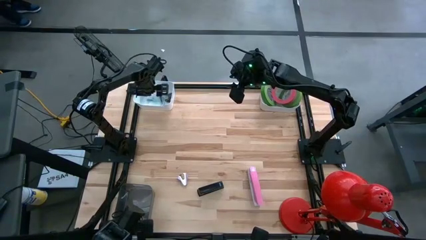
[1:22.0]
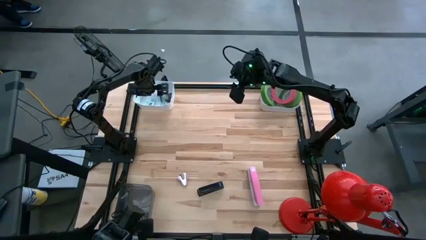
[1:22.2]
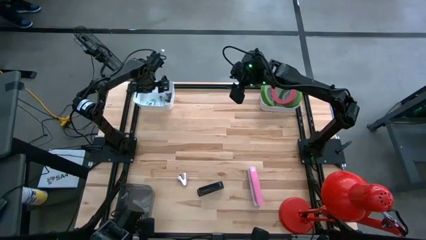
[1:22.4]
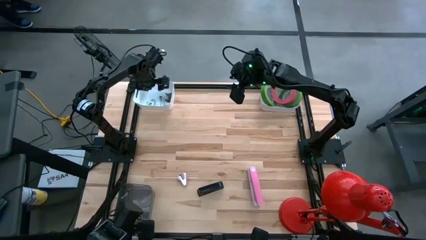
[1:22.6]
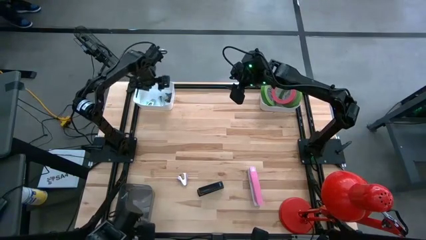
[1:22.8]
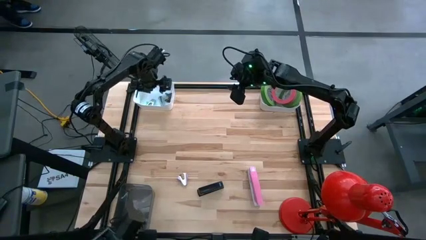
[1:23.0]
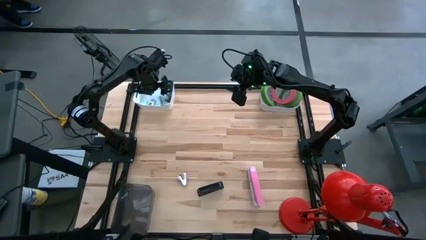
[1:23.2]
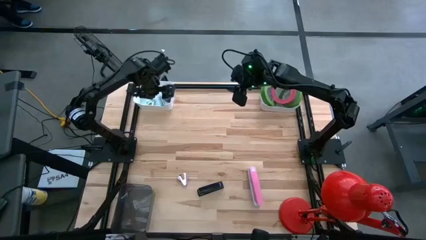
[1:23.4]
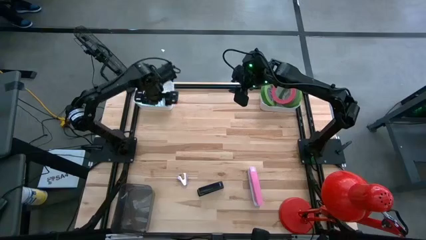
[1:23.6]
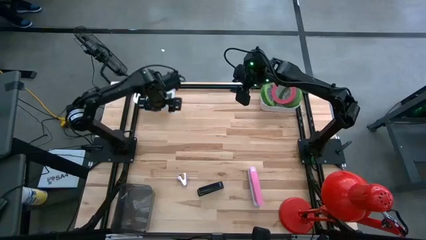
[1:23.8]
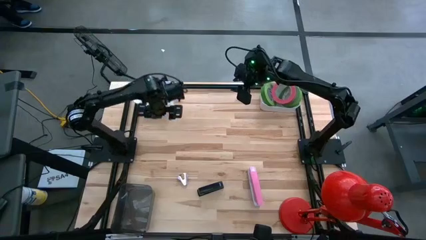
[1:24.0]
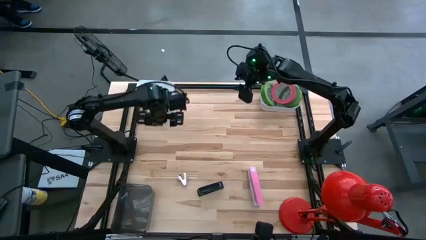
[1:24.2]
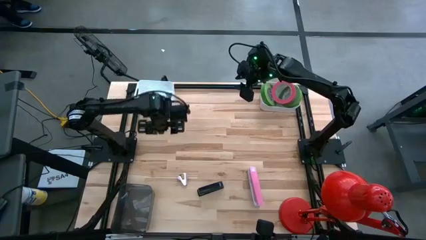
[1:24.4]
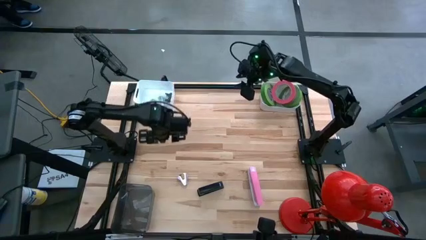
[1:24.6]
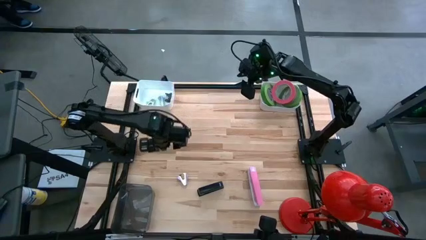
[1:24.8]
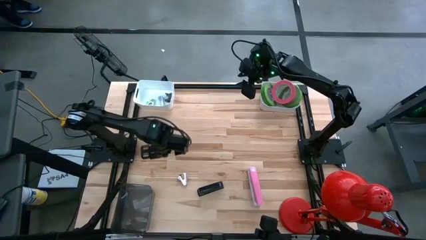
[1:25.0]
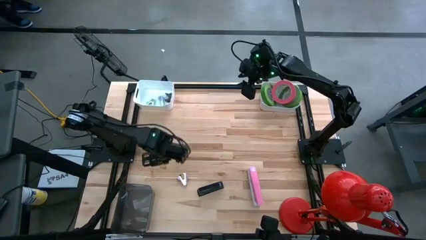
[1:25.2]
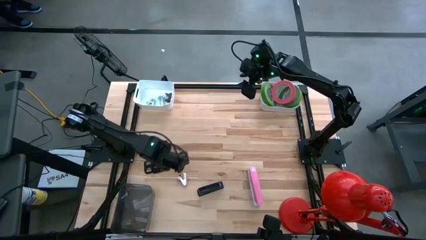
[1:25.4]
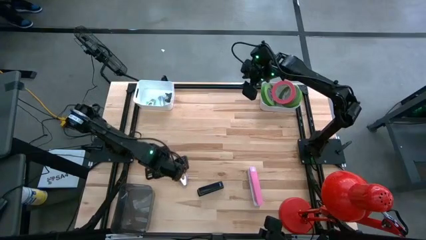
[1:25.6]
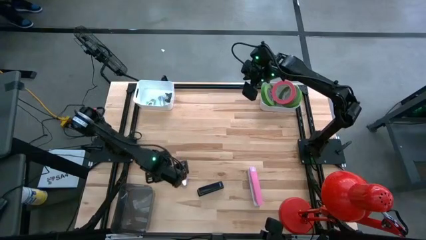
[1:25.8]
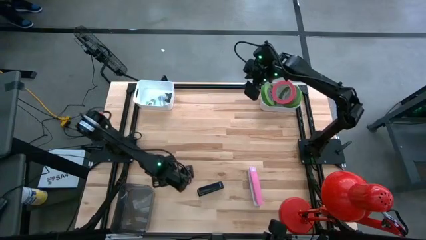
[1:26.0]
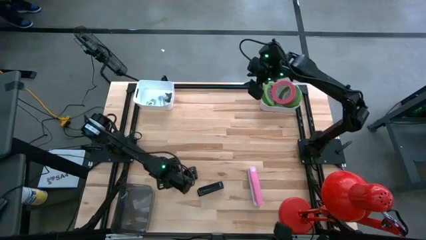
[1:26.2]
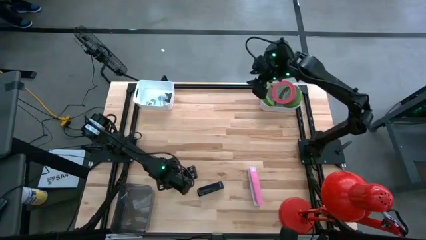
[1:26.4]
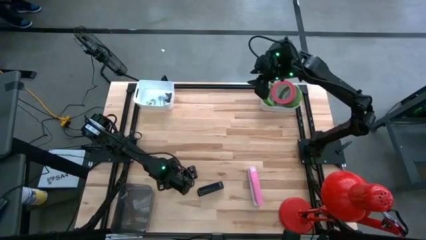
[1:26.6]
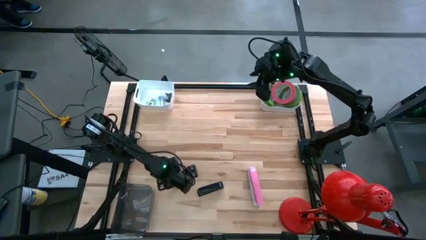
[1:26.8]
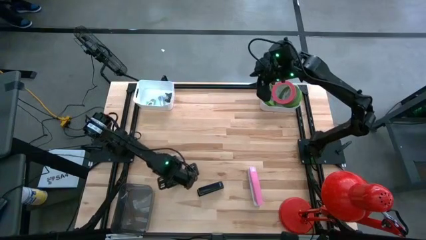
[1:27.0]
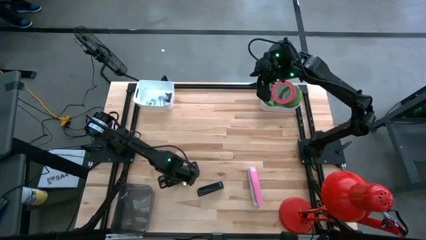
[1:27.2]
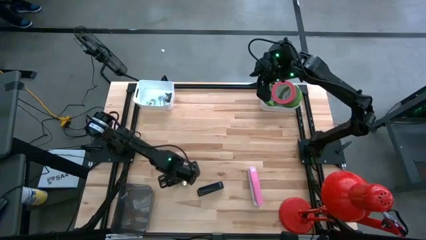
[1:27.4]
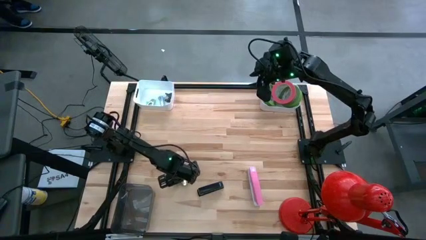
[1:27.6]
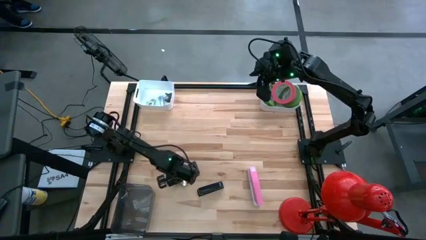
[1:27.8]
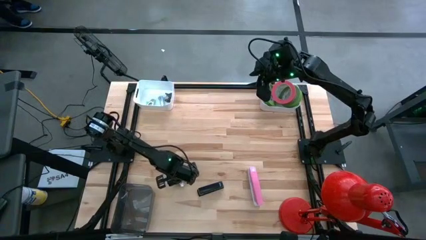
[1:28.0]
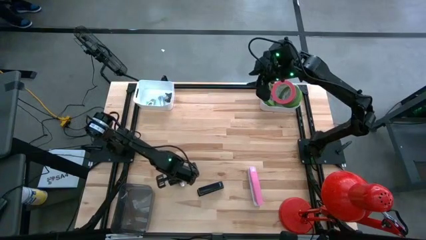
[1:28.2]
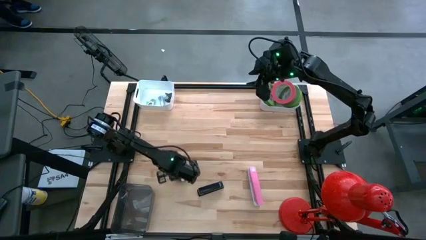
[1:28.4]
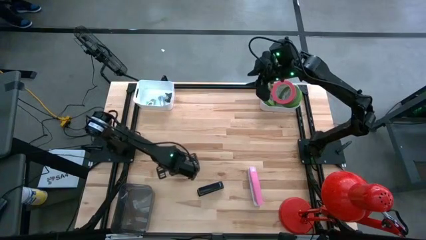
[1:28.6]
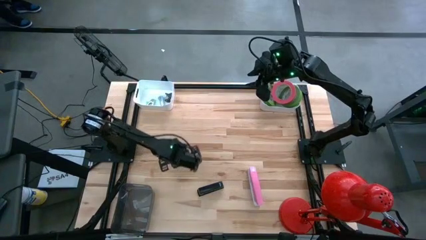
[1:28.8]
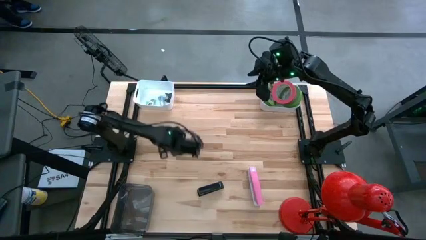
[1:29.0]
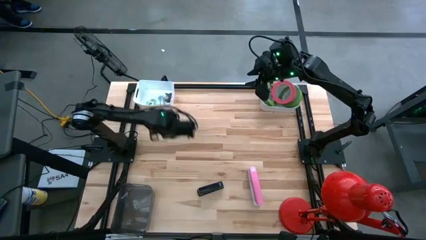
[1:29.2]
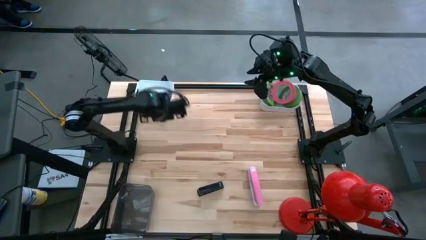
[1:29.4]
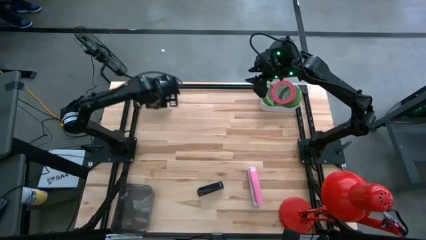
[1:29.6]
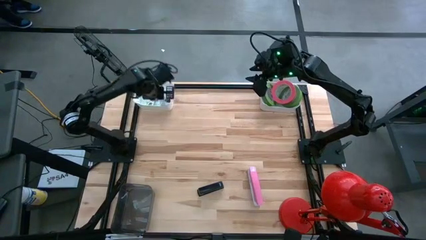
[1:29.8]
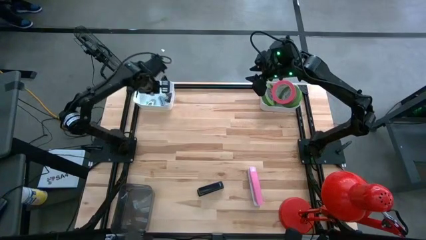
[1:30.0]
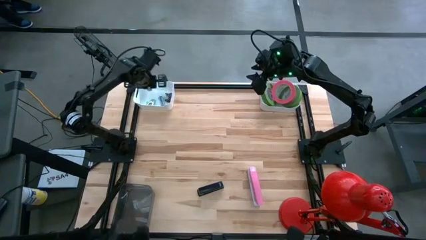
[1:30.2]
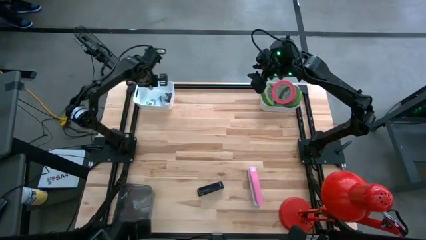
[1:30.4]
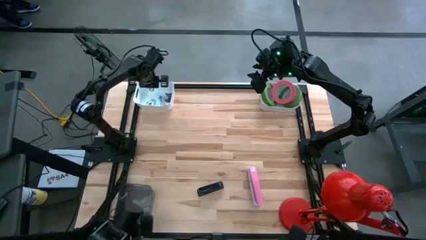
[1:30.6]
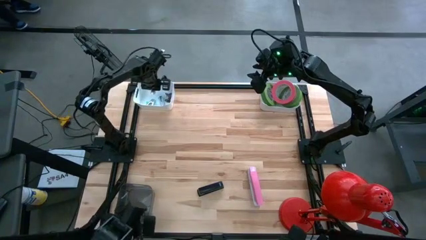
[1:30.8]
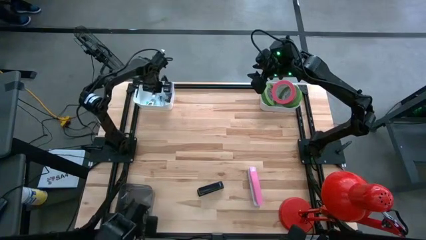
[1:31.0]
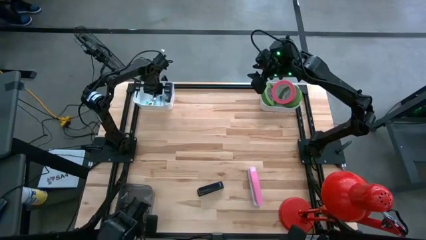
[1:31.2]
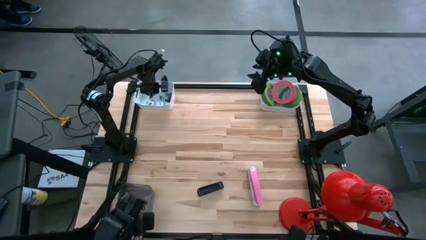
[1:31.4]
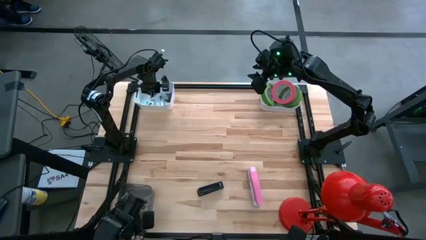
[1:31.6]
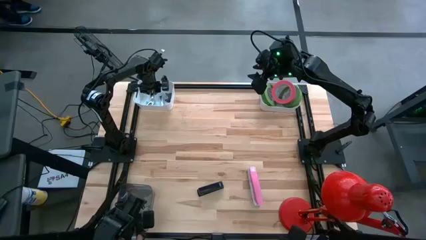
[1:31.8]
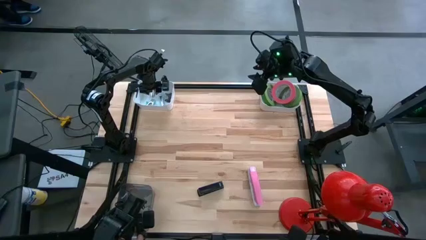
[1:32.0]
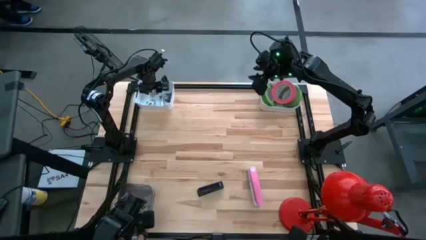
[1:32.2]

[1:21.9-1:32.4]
Task: Pick and place Stapler, Stapler remover, tape
Put the purple staple remover into the left white bin

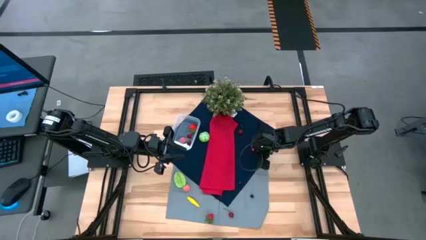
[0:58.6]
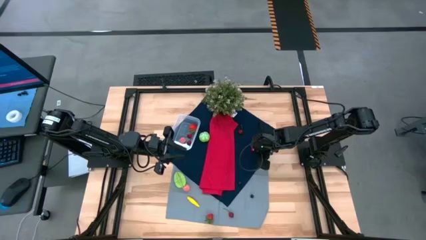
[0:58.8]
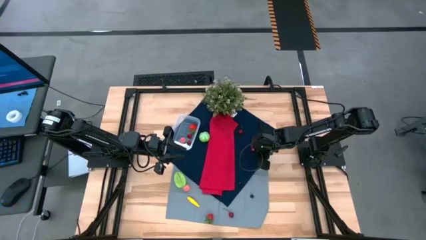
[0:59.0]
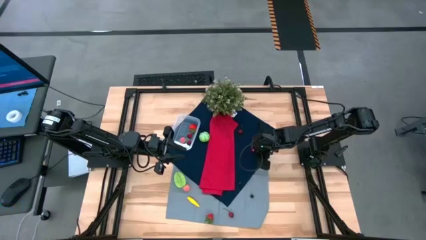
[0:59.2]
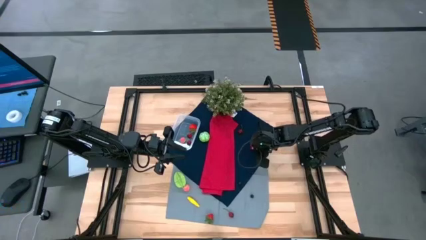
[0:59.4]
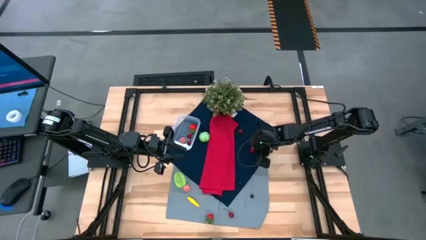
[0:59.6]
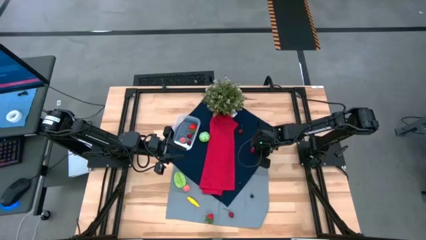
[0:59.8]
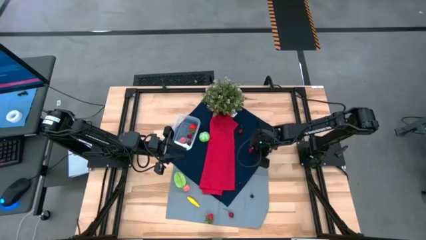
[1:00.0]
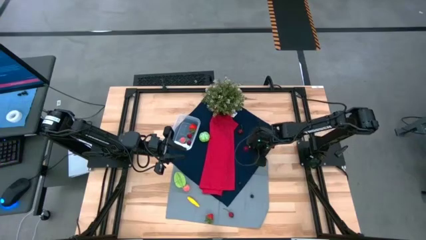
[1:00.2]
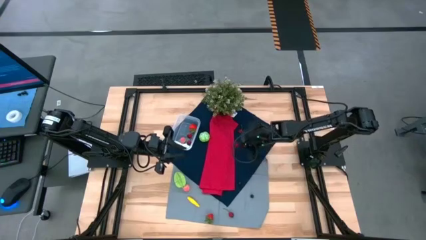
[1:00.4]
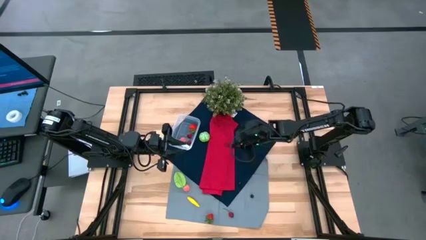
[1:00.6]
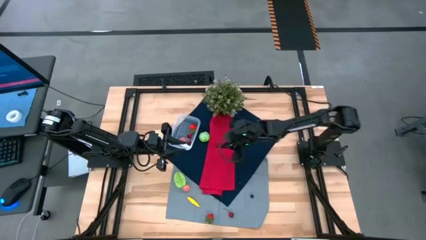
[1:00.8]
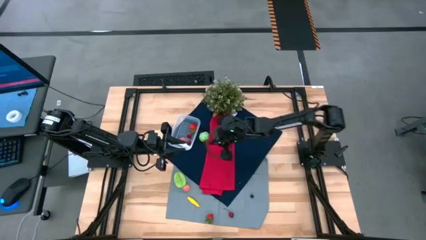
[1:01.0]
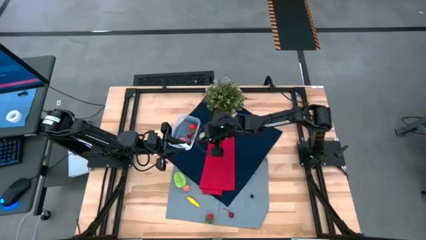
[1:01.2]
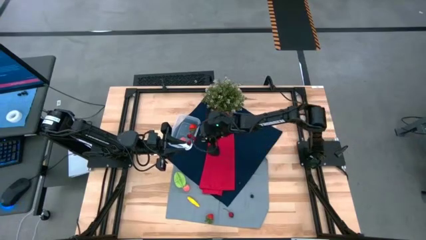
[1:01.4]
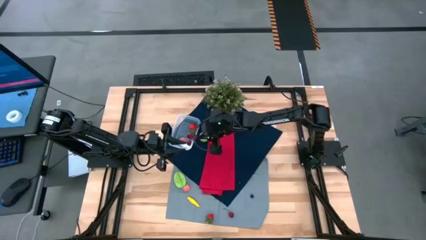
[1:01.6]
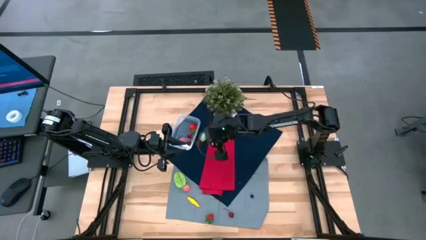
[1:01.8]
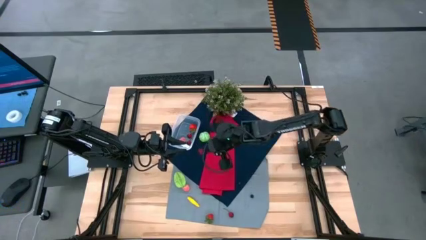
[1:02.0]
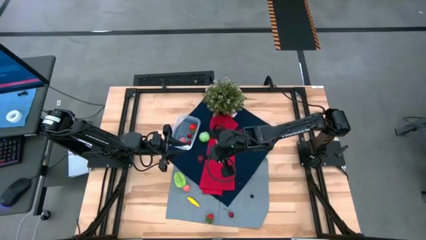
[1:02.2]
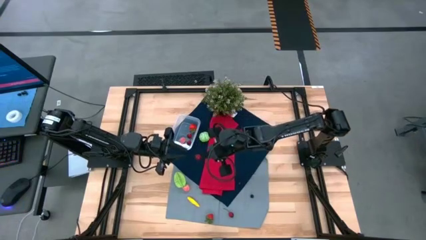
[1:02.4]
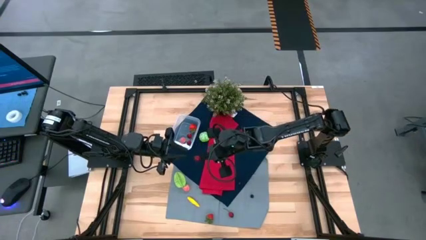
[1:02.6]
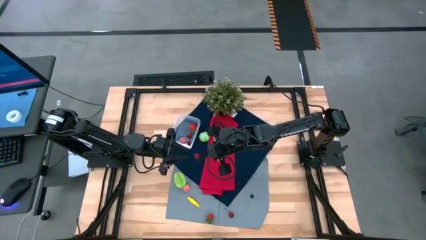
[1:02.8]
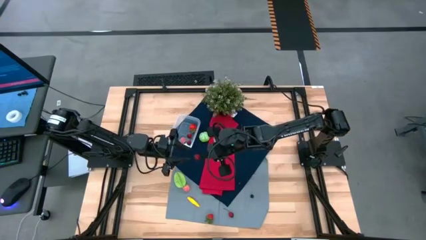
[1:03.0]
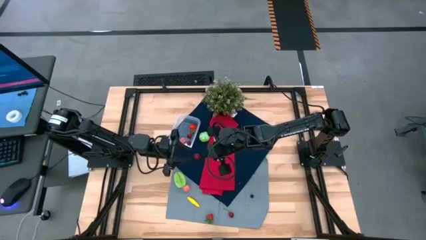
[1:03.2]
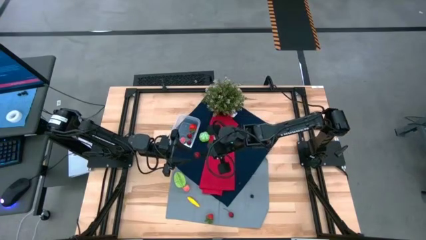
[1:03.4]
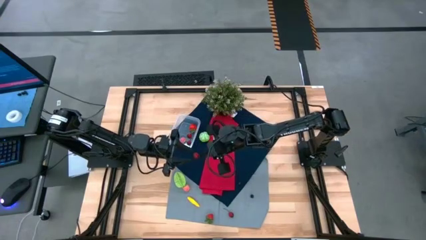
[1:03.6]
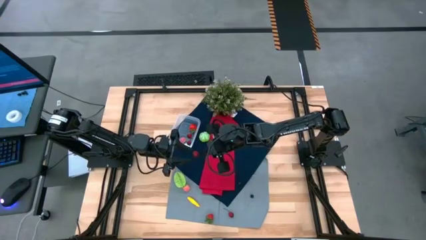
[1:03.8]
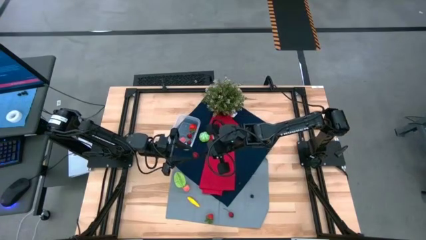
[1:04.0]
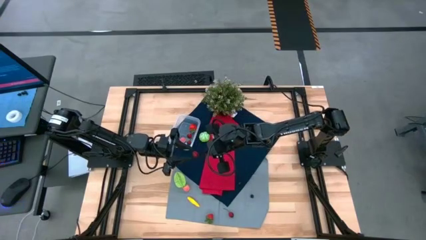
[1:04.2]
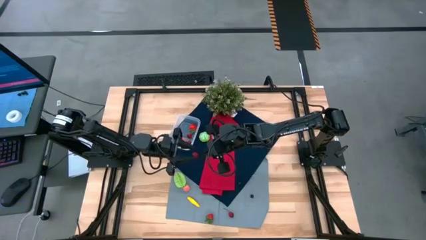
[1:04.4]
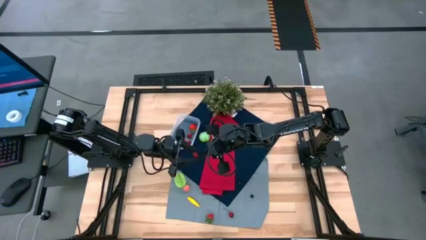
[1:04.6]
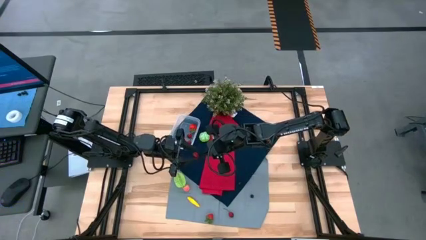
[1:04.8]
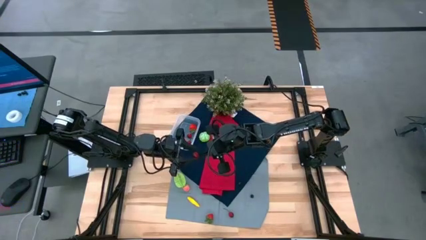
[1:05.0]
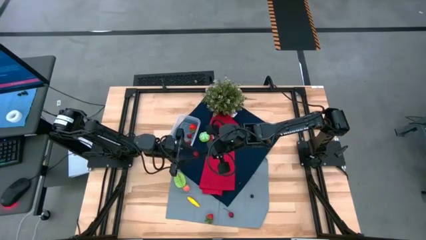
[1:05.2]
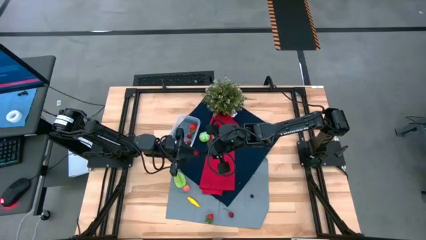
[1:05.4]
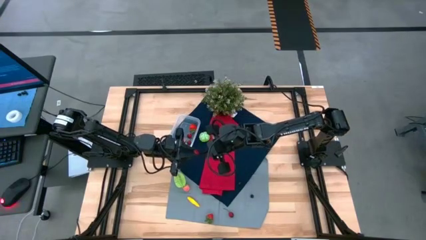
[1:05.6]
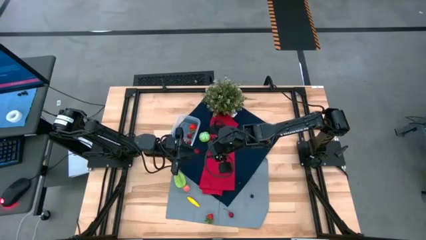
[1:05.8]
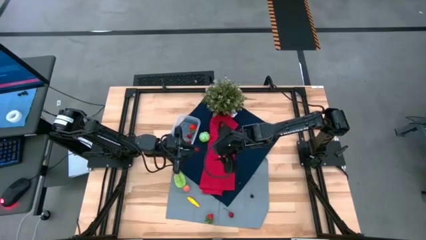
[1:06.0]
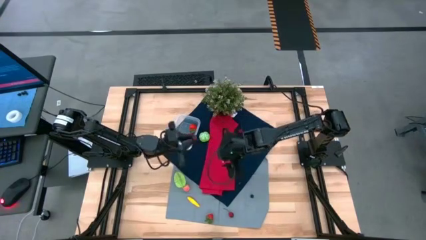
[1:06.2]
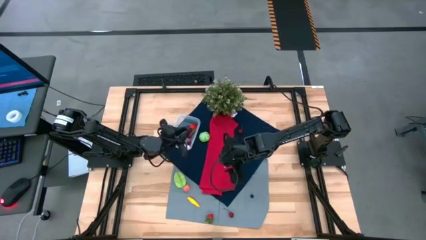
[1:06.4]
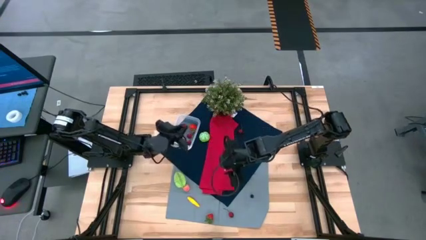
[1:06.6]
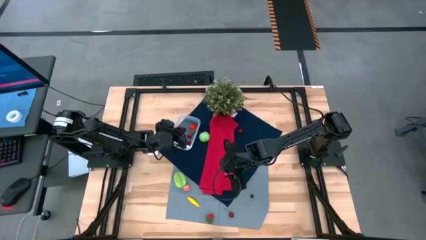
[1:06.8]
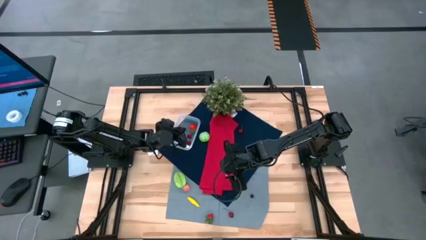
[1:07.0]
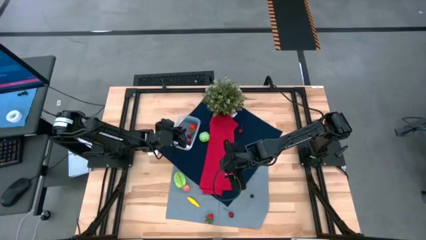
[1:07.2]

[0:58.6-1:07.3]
Task: Pick and placing Produce into tupperware
Put the top right red cherry into the transparent bin
